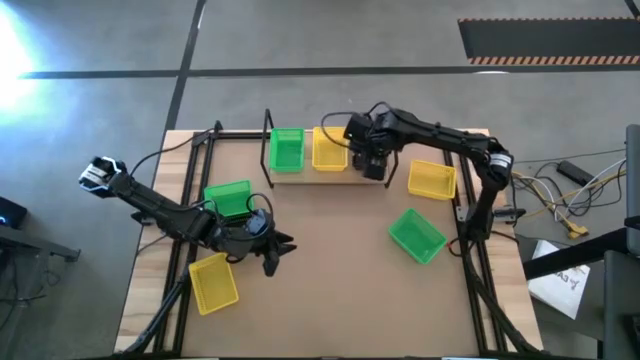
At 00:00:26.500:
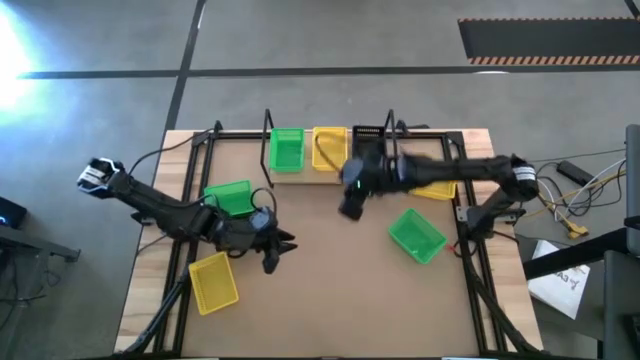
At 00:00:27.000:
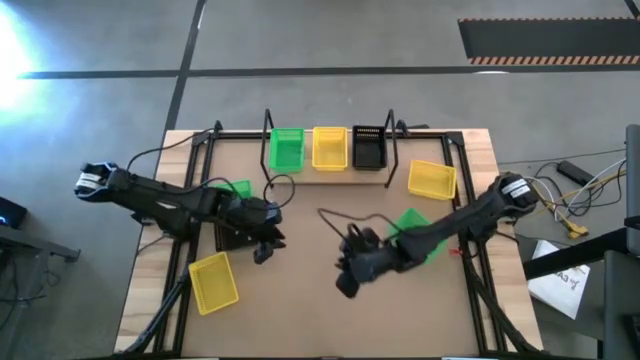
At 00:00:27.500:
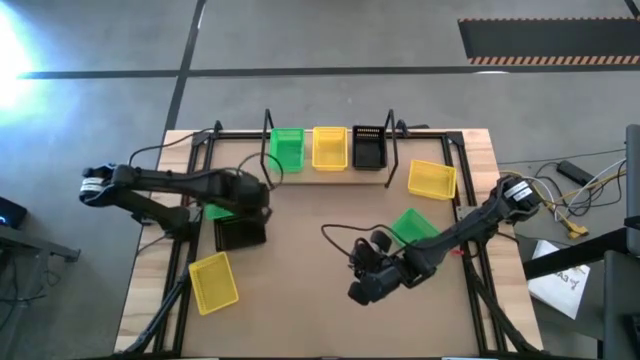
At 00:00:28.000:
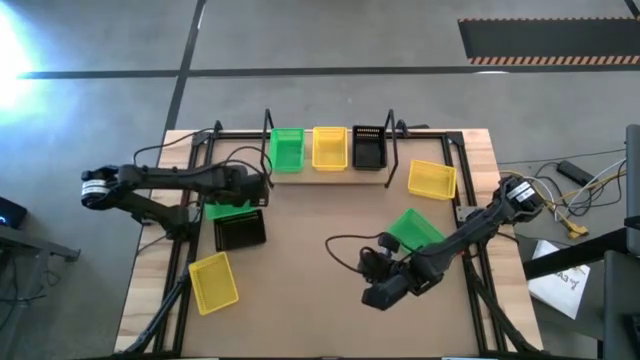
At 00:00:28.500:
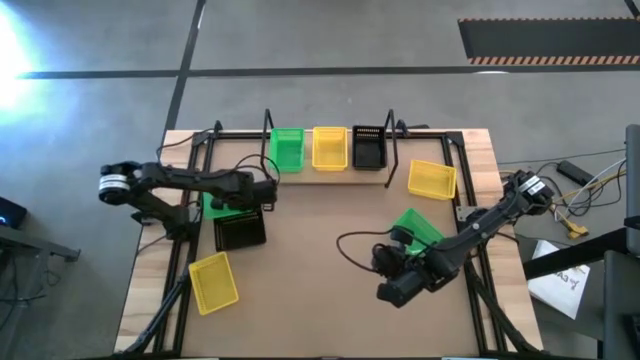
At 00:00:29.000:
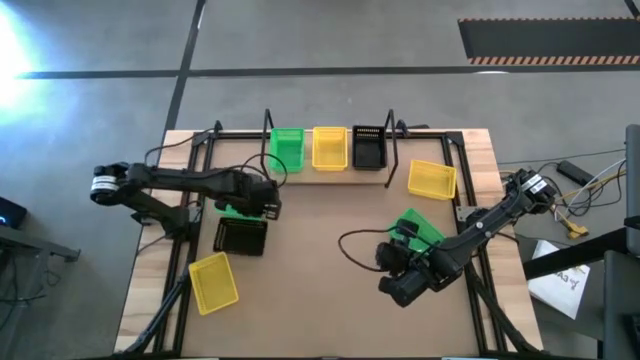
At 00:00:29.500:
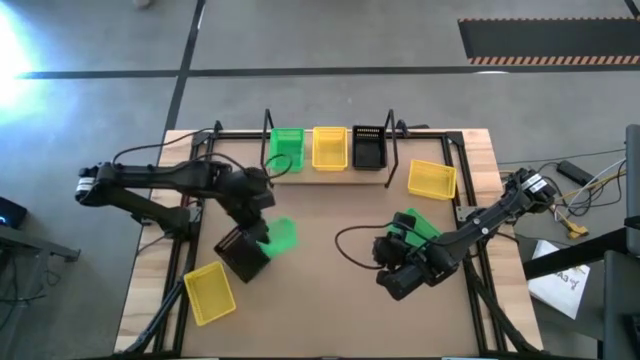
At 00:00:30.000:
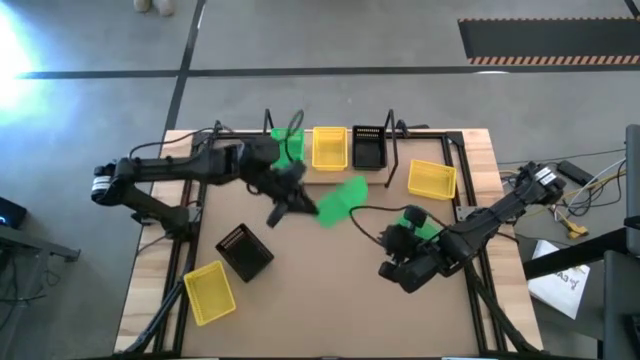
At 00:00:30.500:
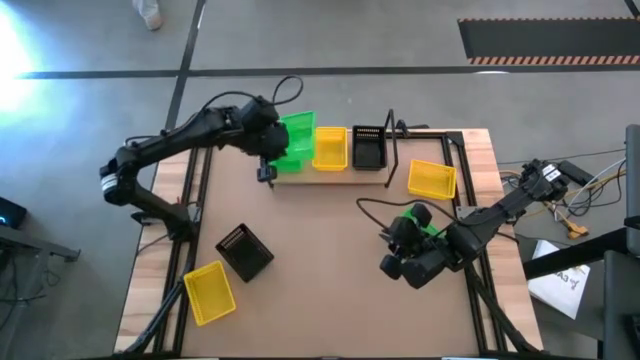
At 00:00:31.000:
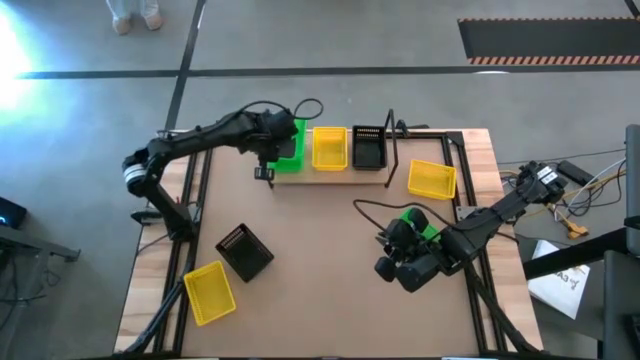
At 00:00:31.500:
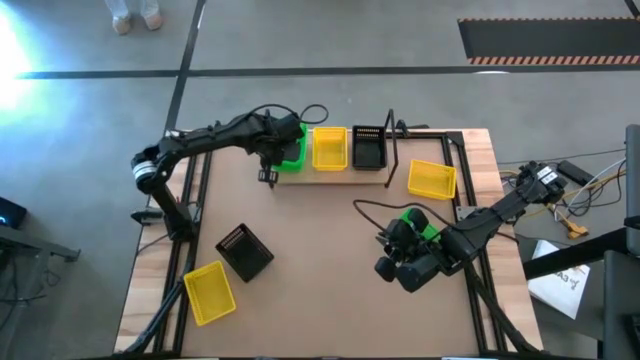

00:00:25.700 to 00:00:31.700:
Task: Stack baskets on shelf by color
Stack the left green bin on top of the other green bin on the shelf

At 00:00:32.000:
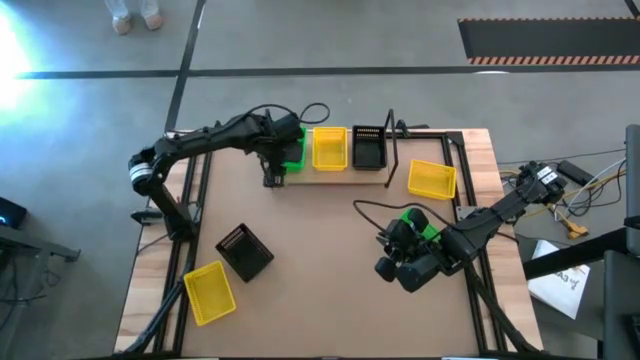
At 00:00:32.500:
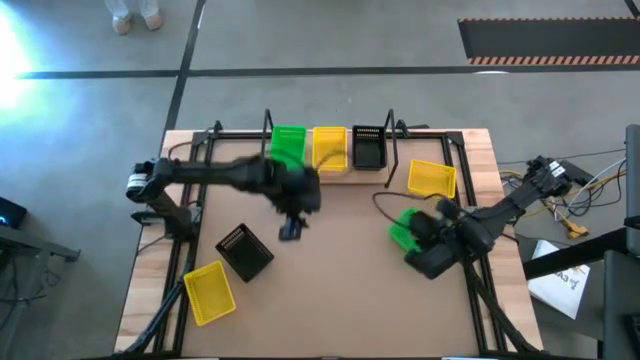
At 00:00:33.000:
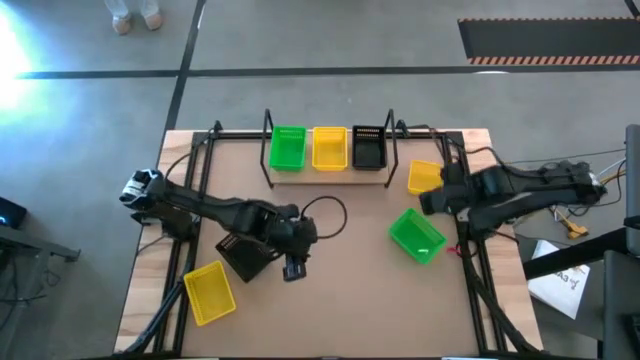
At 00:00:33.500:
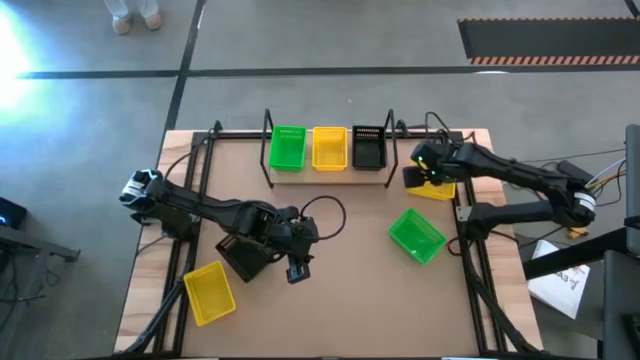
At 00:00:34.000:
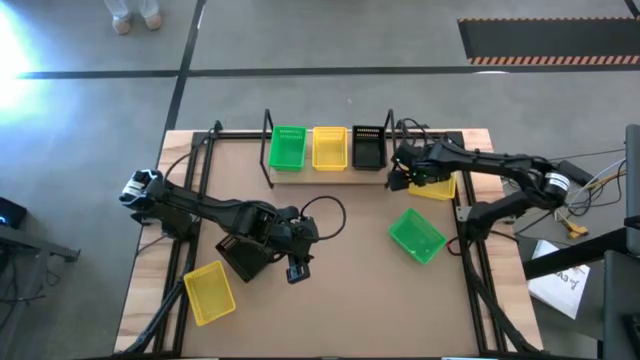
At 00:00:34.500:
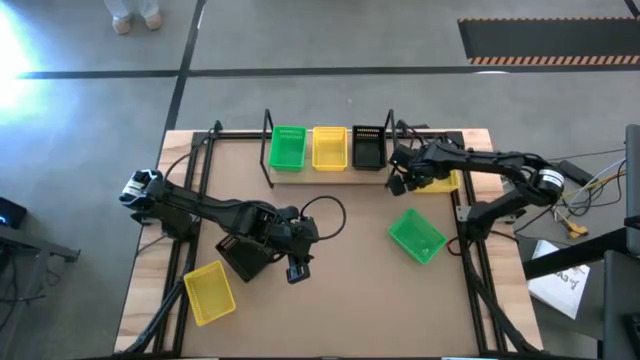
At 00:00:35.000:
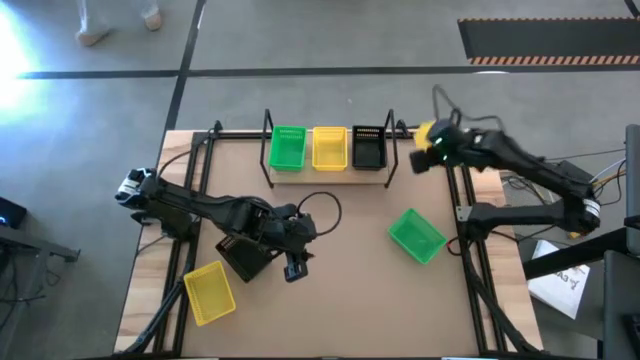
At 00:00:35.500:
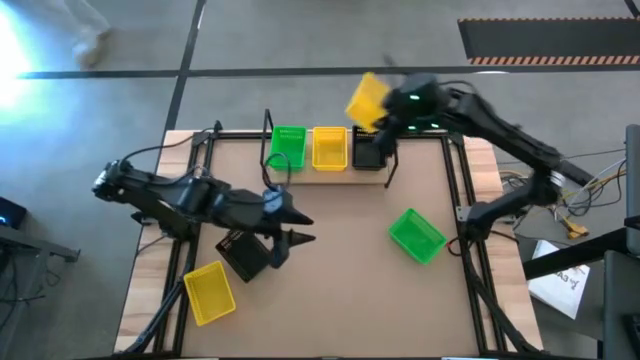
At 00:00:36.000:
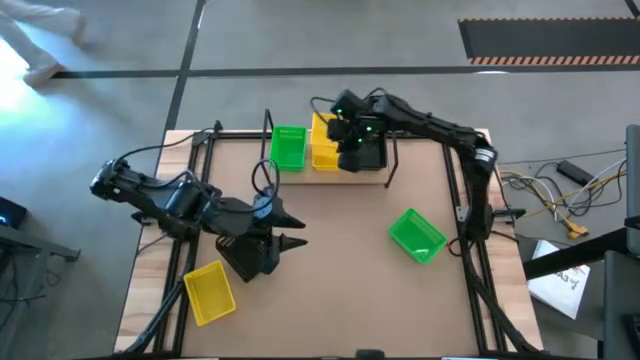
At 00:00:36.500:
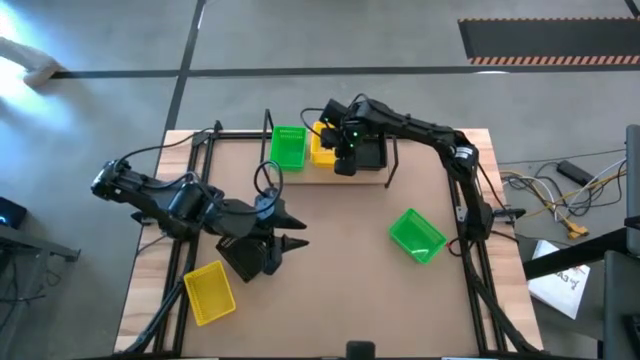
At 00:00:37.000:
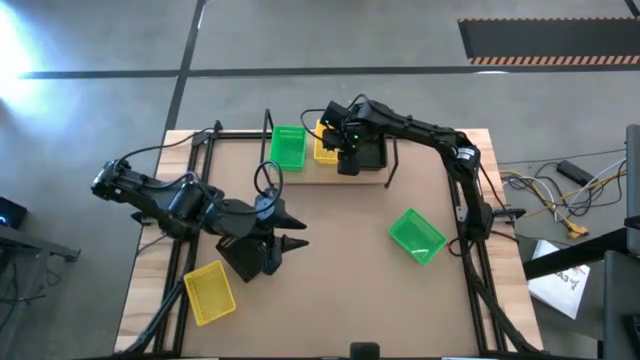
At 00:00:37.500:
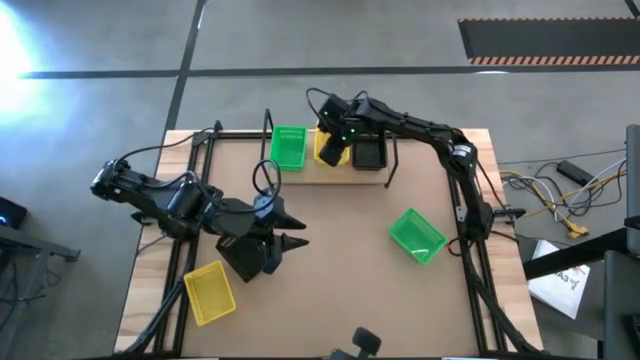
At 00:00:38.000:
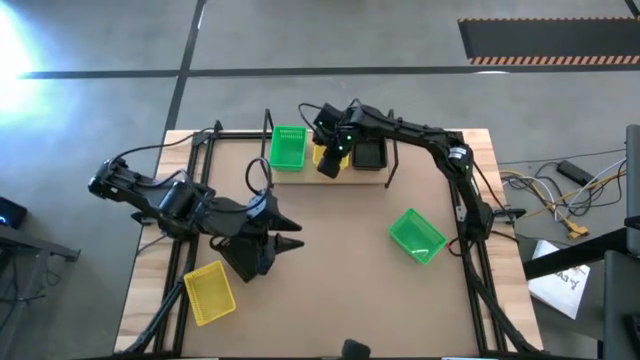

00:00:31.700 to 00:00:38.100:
Stack the right yellow bin on top of the other yellow bin on the shelf

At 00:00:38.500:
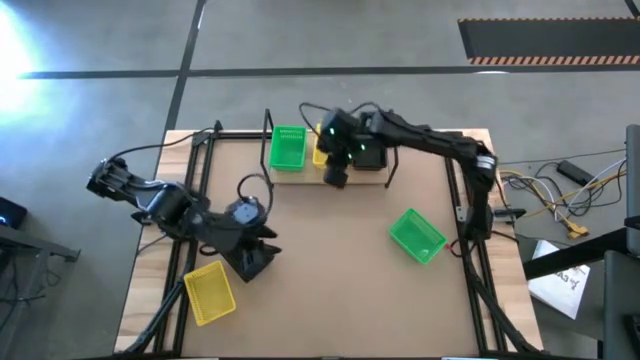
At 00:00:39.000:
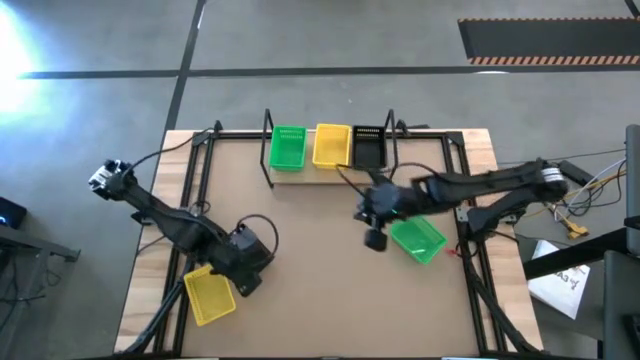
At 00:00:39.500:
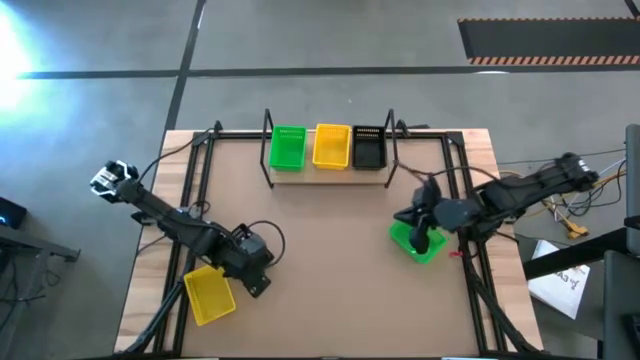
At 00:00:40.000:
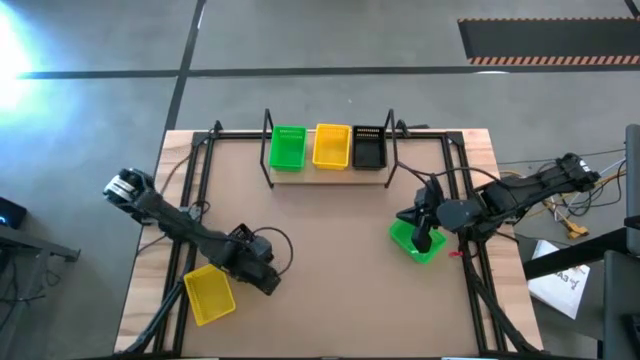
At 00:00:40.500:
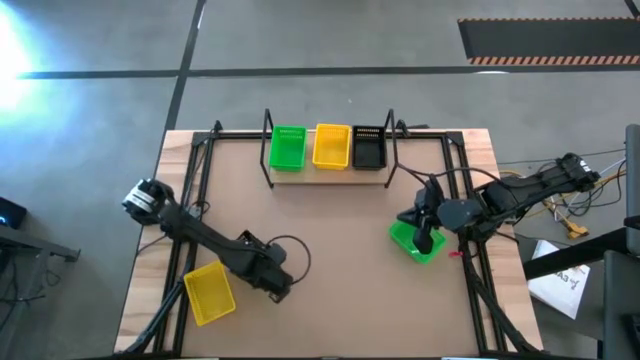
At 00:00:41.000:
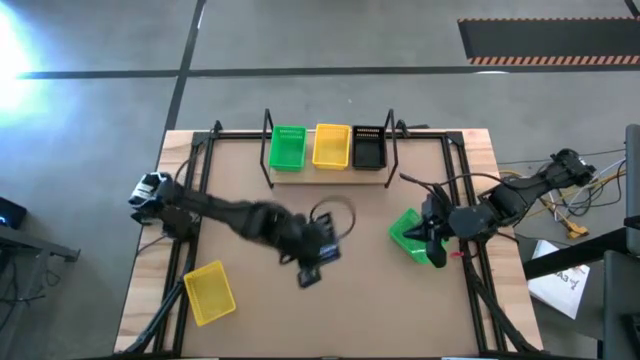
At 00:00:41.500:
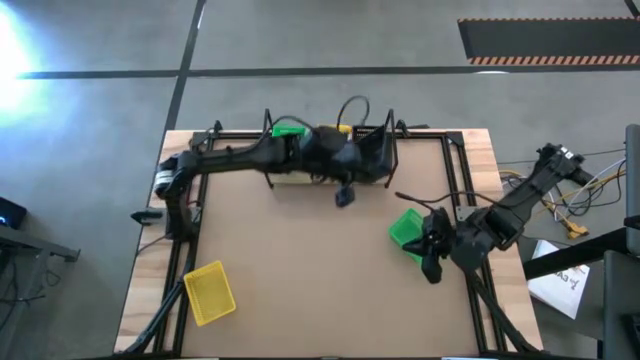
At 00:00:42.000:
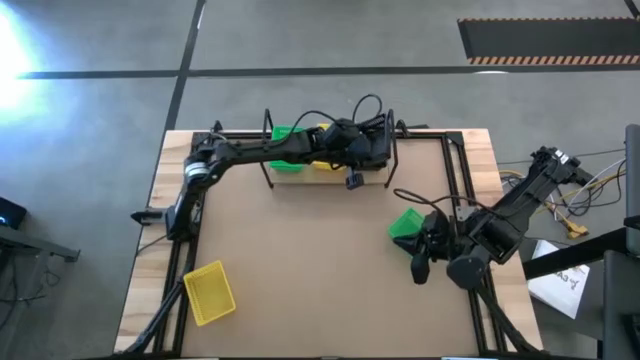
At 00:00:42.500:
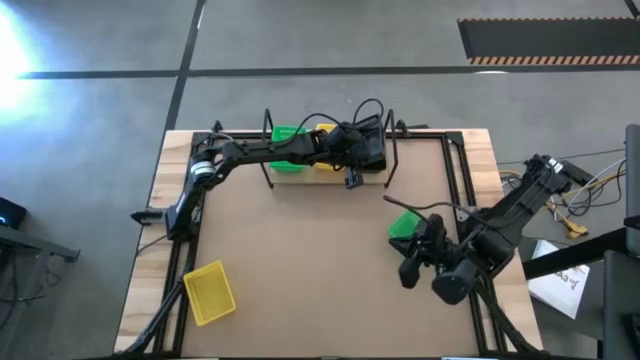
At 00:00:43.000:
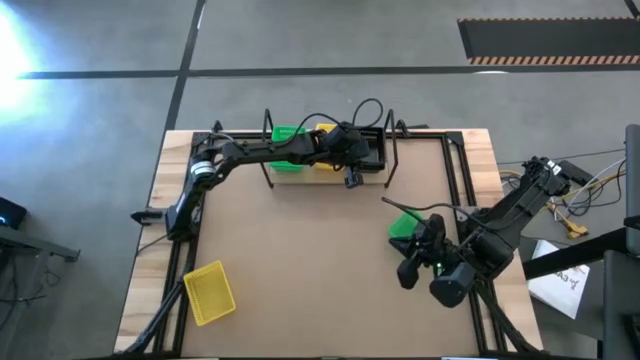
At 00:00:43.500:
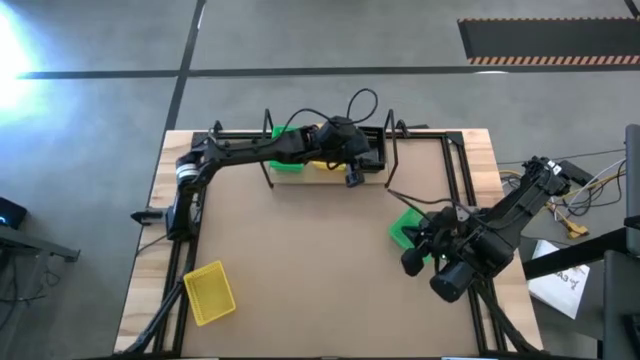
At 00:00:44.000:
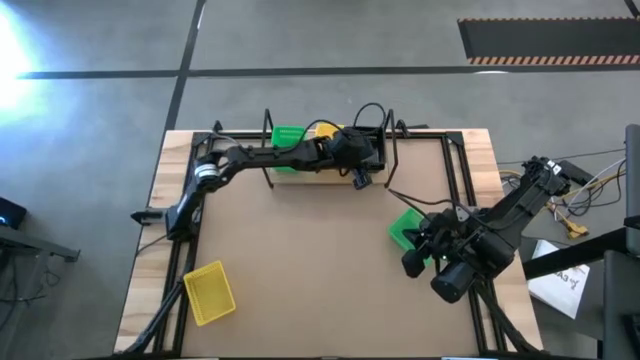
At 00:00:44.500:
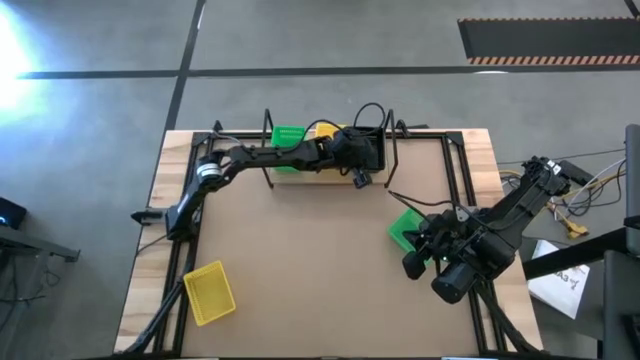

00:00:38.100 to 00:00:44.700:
Stack the black bin on top of the other black bin on the shelf

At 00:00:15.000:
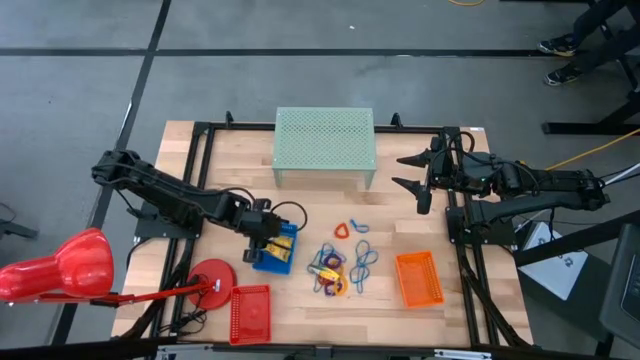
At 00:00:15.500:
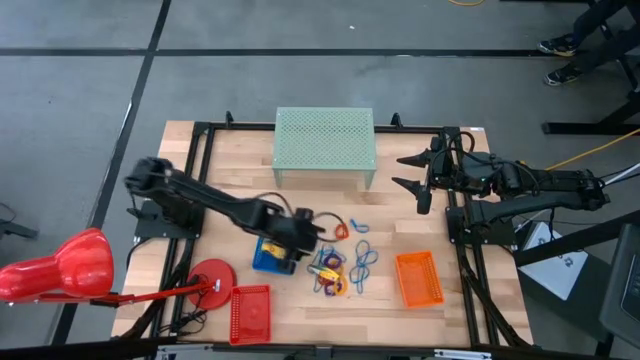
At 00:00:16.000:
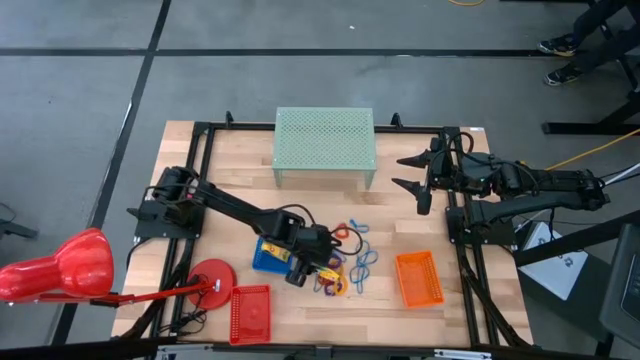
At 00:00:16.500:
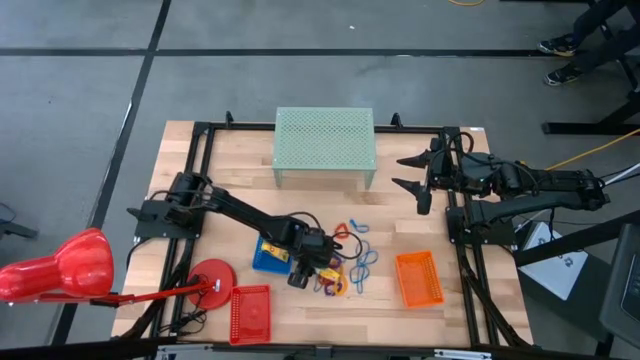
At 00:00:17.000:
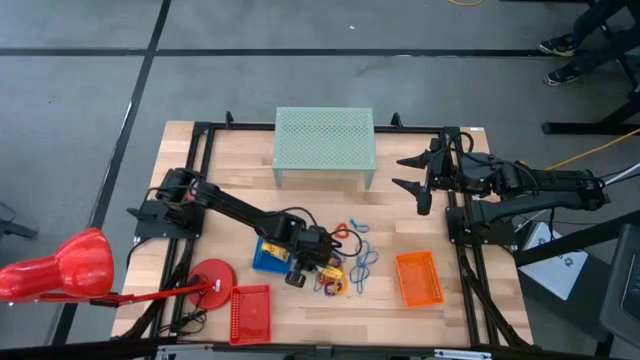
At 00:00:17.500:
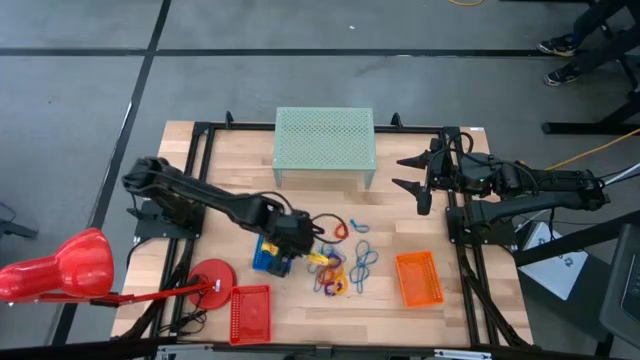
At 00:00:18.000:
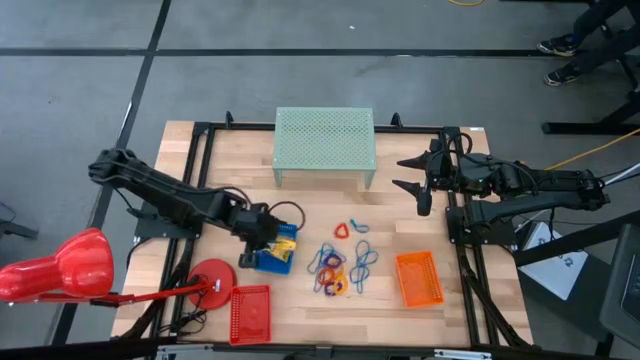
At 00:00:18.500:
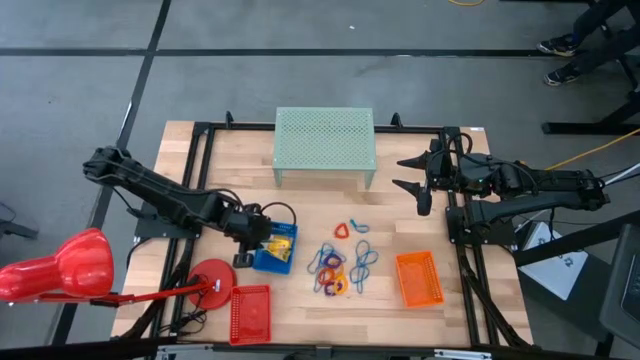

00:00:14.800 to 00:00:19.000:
Task: Pick & Place Office Desk Supplies
Put the yellow box of crayons into the blue bin
